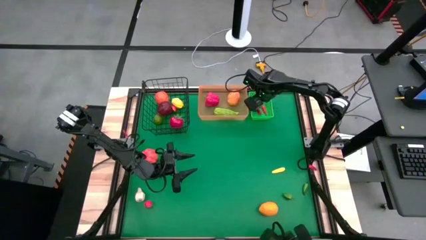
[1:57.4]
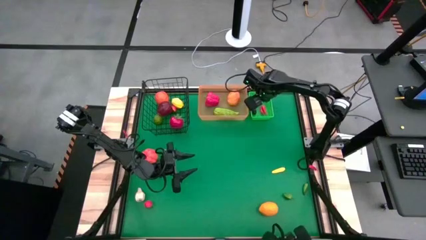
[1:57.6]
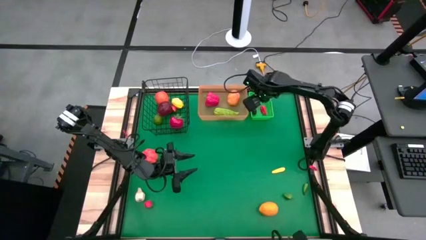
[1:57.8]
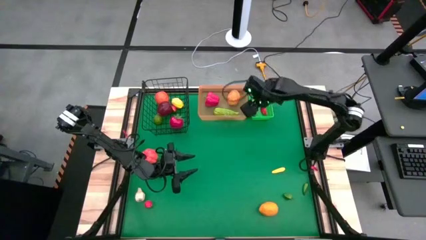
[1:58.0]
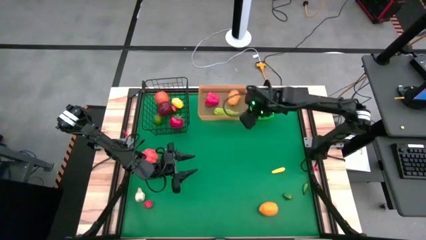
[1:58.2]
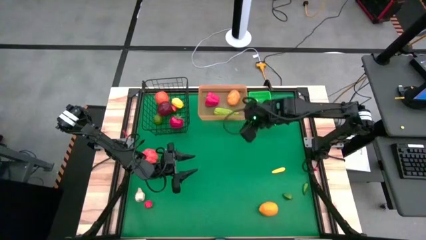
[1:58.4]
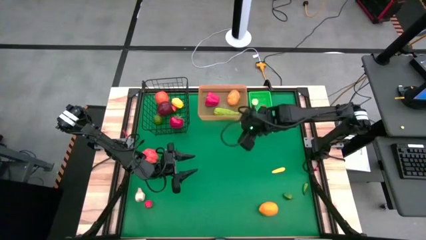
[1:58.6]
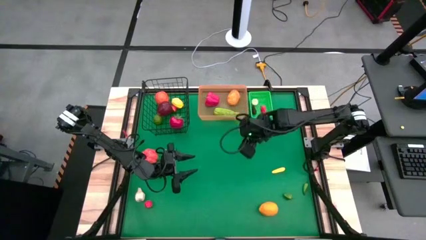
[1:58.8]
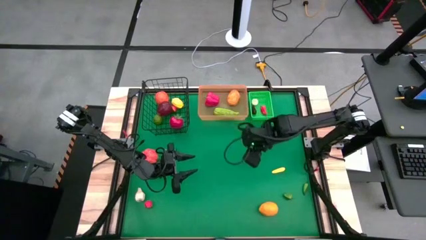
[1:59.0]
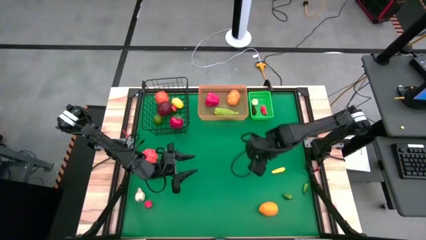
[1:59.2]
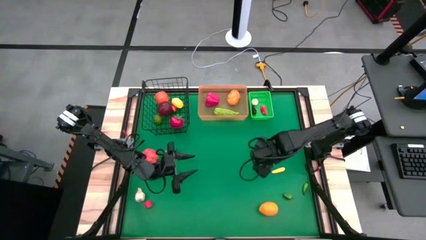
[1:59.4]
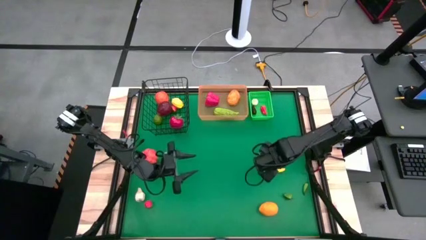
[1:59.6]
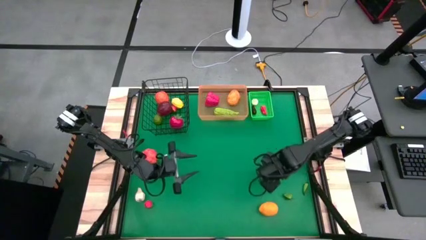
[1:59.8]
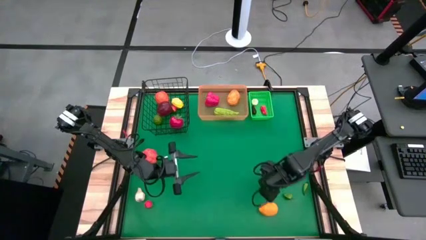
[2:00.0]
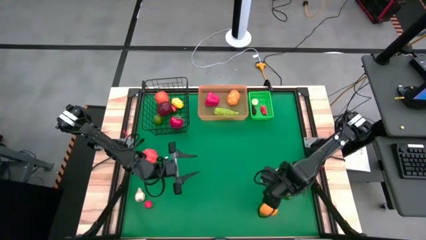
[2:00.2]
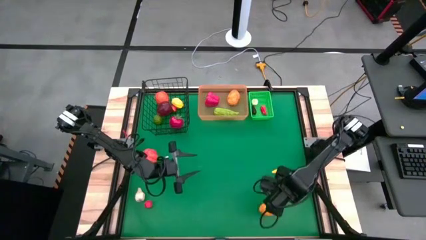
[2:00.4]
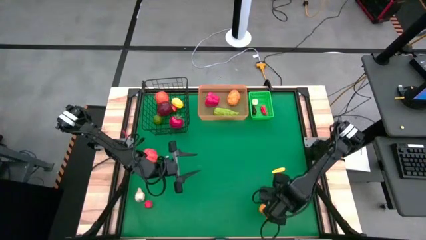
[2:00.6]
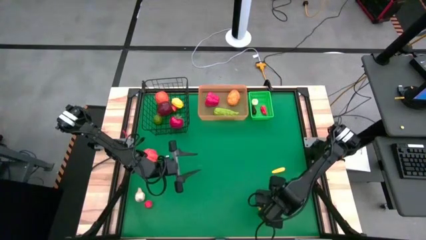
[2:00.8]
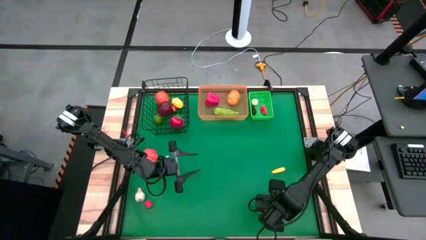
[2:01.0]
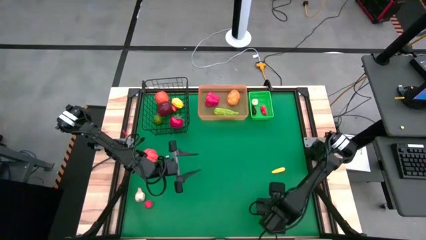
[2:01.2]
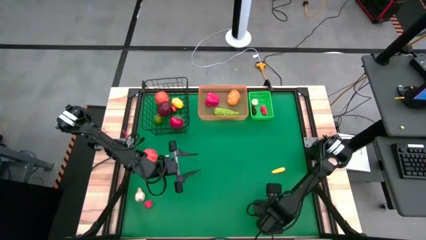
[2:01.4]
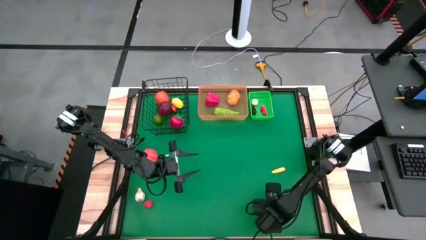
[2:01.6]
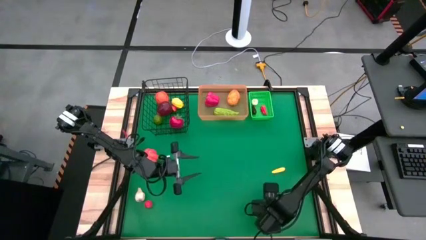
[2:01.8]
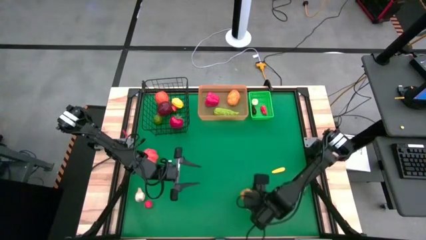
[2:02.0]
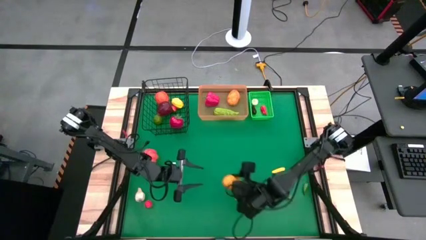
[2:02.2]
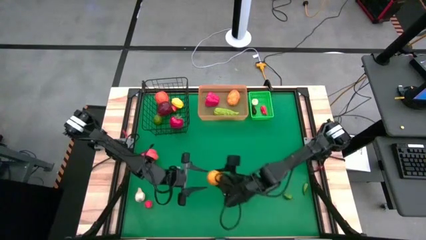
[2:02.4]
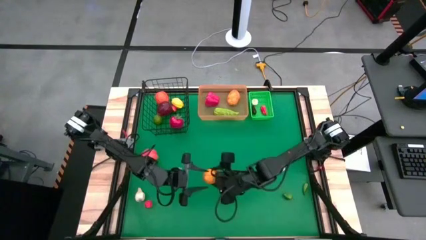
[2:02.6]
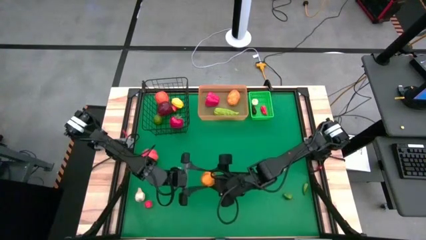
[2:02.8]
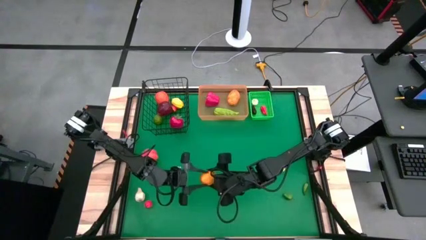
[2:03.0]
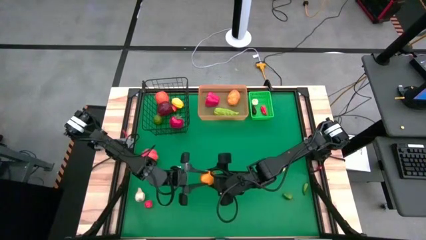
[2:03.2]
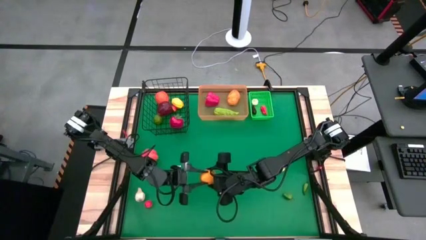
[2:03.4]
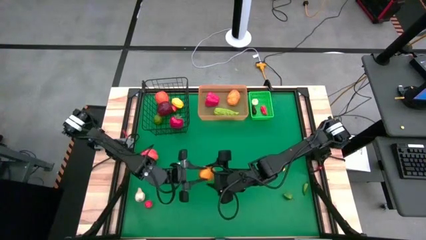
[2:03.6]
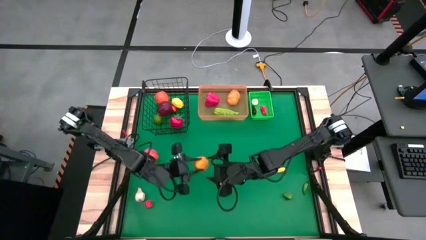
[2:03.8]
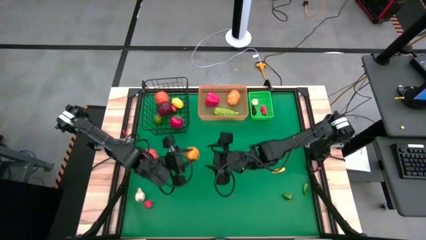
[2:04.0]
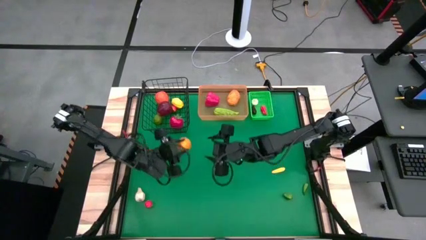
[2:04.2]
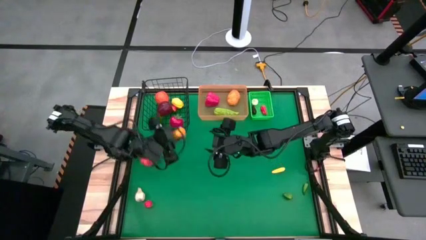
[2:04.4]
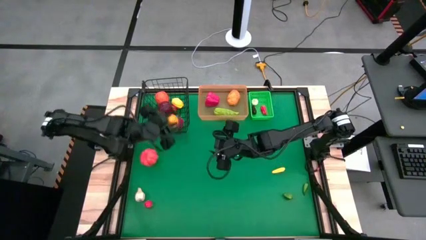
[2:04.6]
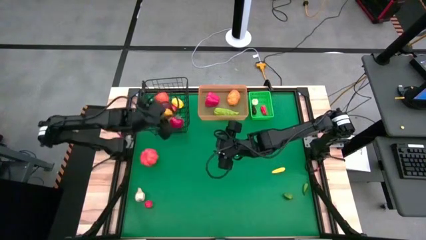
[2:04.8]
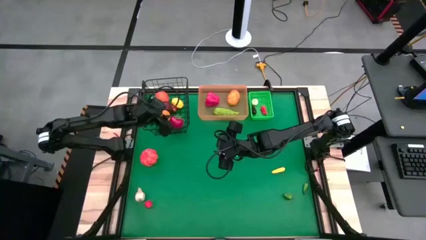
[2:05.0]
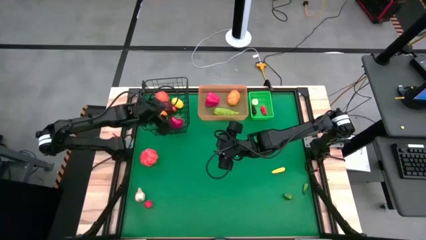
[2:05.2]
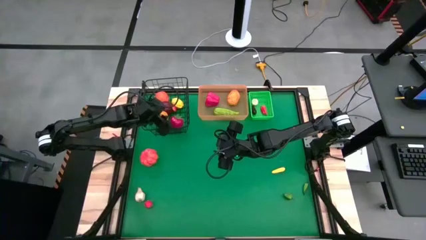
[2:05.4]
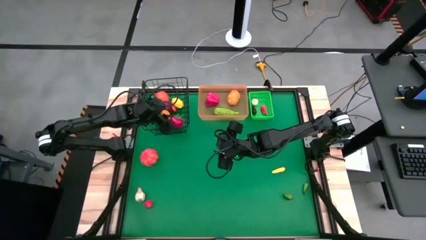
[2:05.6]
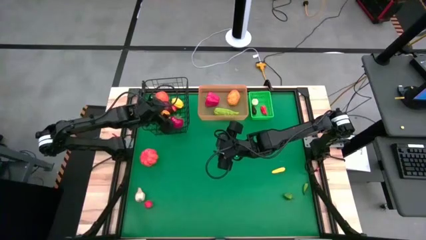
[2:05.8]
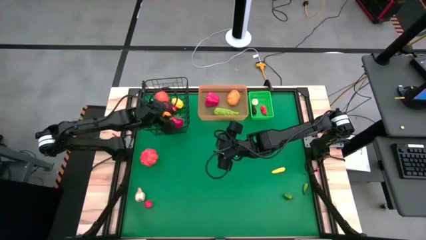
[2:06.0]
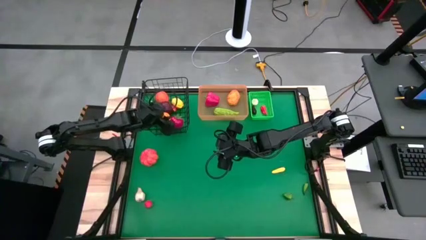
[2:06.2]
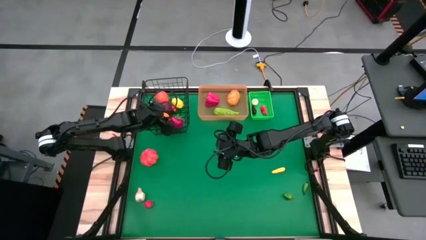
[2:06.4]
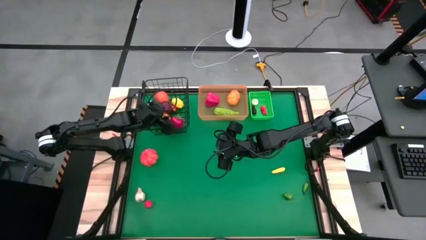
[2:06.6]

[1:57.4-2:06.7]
Task: Sort produce into baskets
Put the yellow lemon into the black wire basket

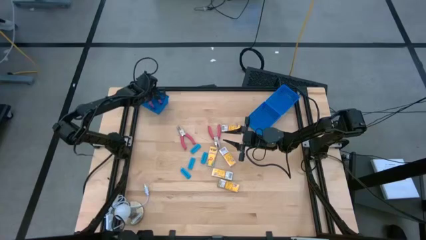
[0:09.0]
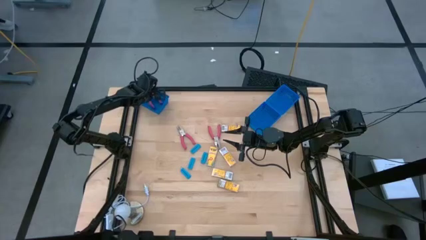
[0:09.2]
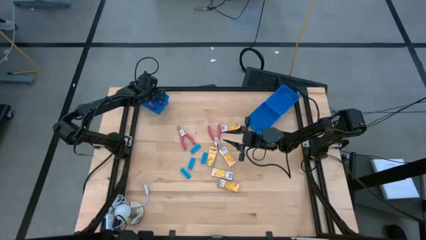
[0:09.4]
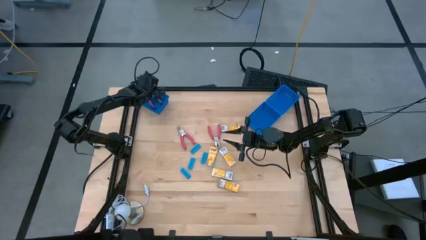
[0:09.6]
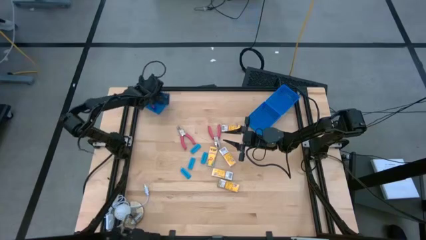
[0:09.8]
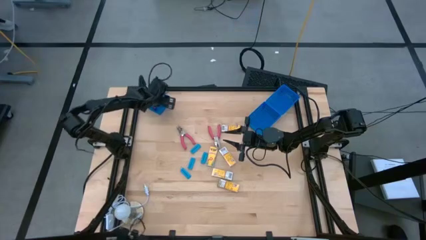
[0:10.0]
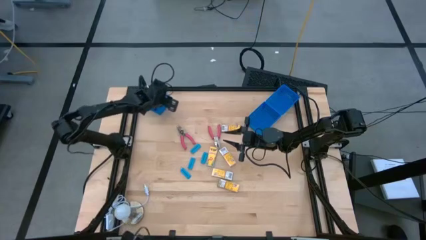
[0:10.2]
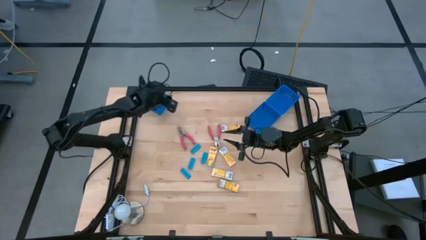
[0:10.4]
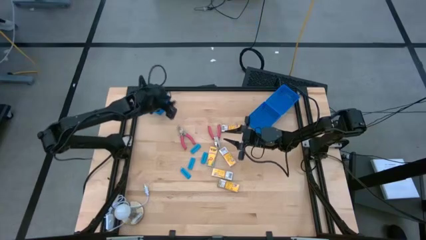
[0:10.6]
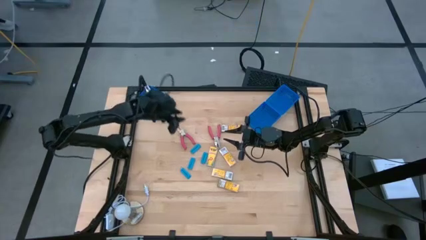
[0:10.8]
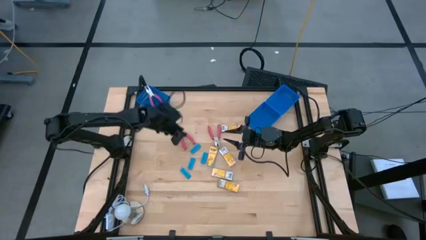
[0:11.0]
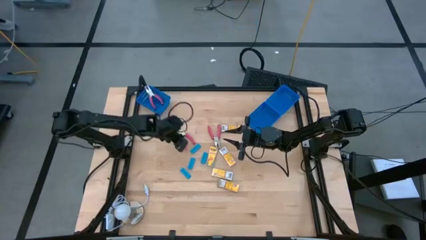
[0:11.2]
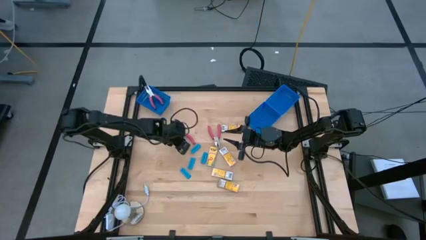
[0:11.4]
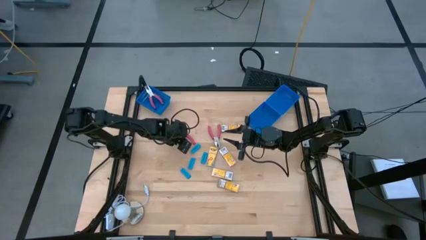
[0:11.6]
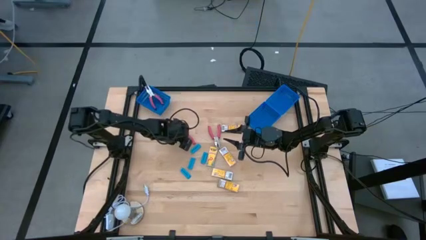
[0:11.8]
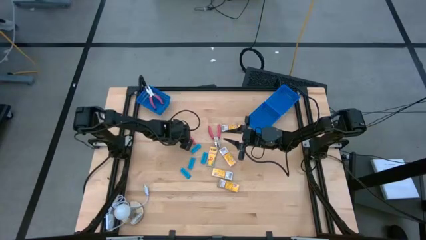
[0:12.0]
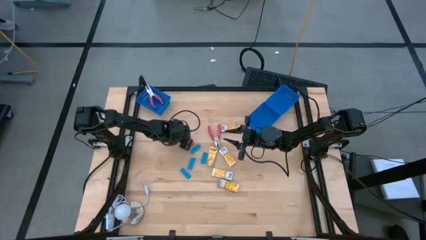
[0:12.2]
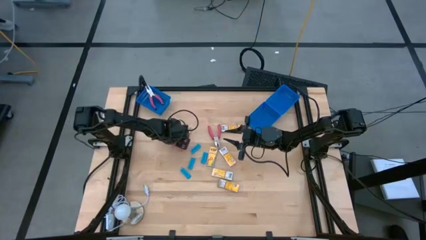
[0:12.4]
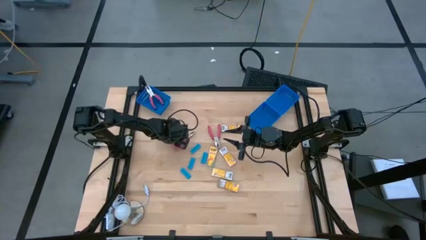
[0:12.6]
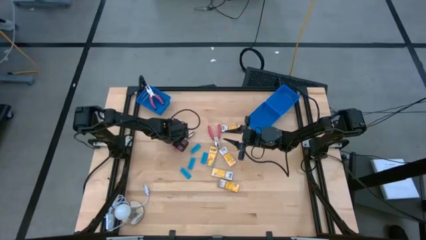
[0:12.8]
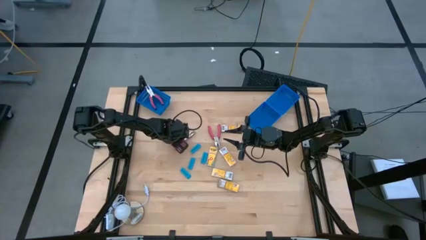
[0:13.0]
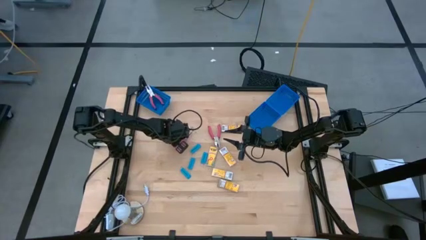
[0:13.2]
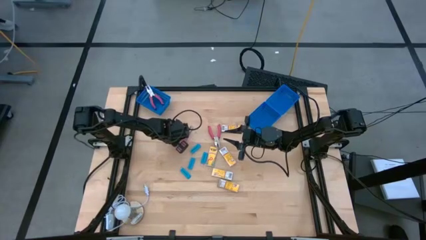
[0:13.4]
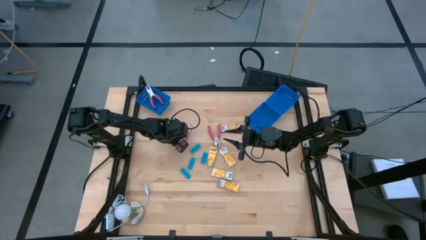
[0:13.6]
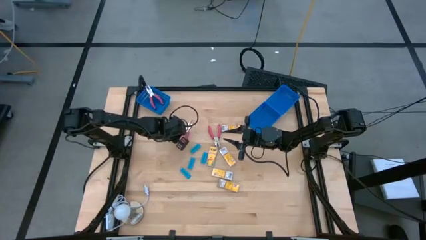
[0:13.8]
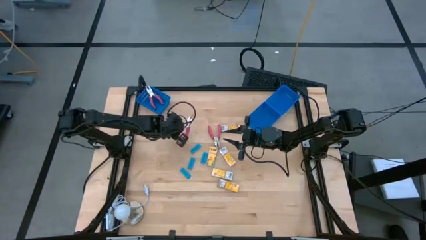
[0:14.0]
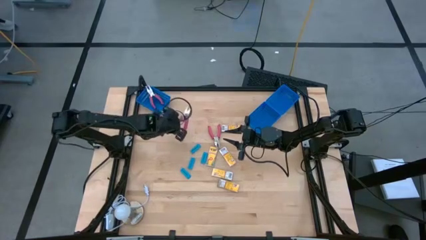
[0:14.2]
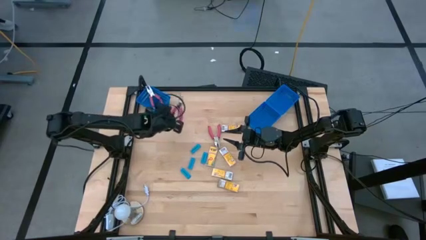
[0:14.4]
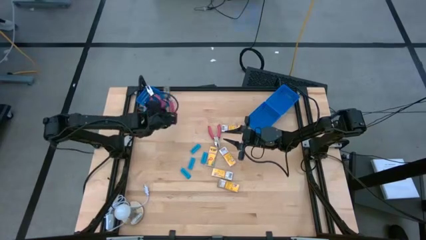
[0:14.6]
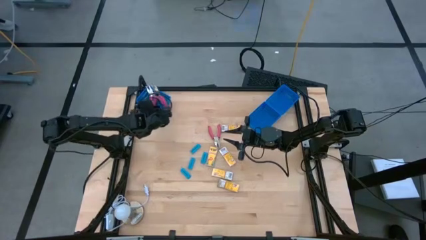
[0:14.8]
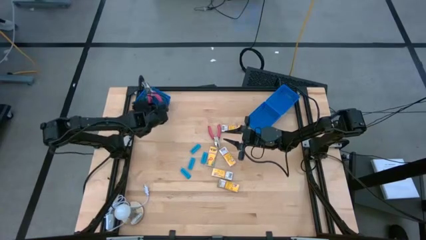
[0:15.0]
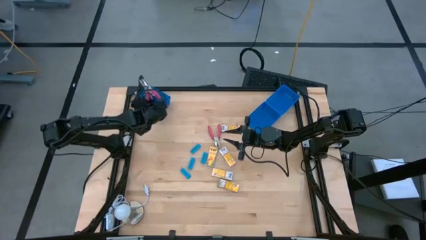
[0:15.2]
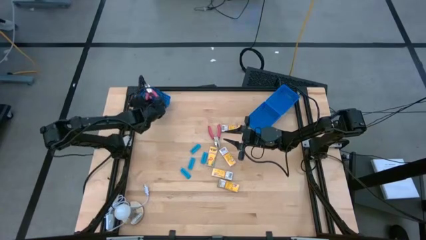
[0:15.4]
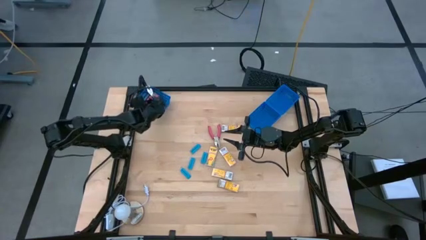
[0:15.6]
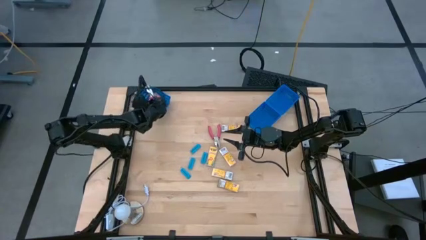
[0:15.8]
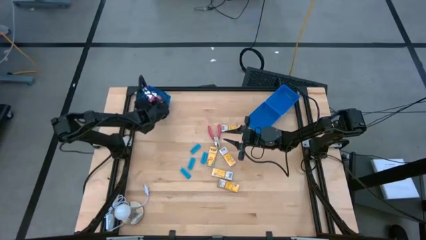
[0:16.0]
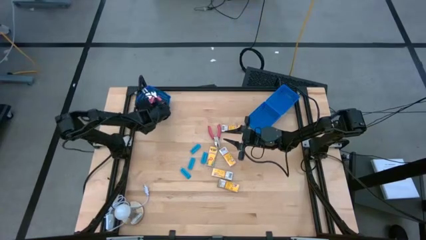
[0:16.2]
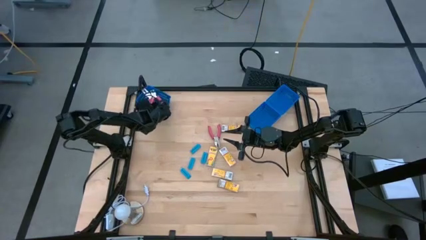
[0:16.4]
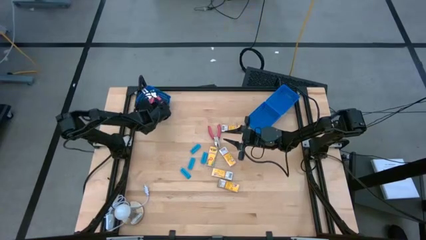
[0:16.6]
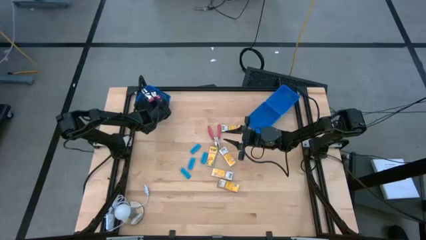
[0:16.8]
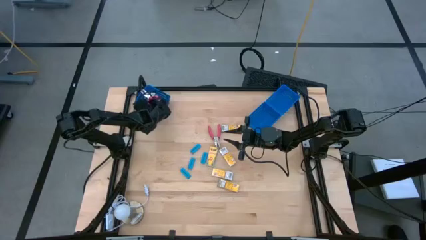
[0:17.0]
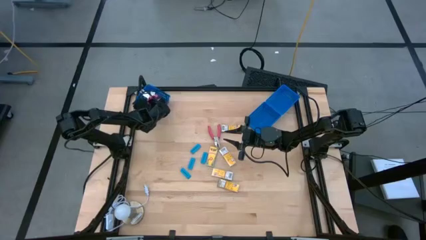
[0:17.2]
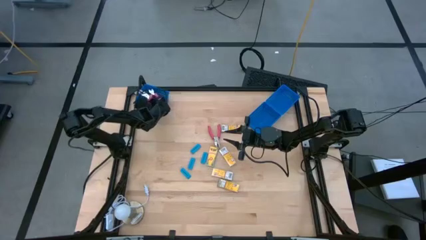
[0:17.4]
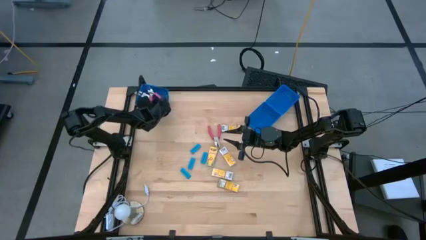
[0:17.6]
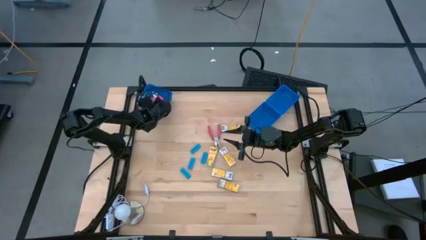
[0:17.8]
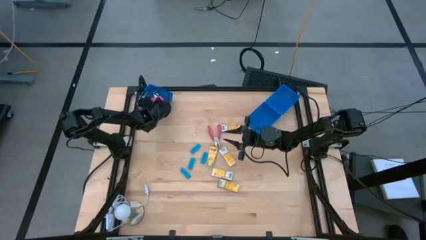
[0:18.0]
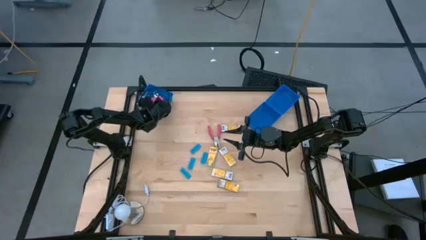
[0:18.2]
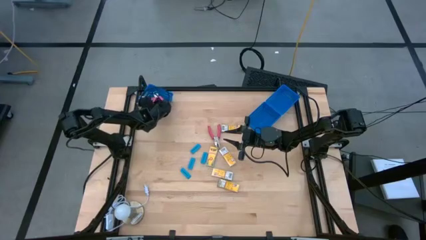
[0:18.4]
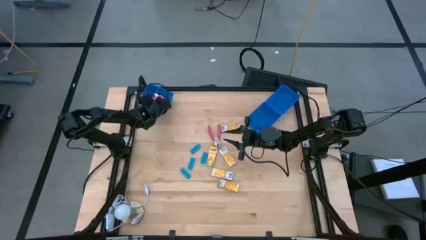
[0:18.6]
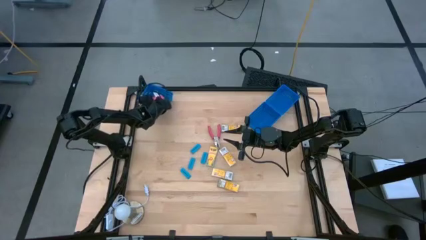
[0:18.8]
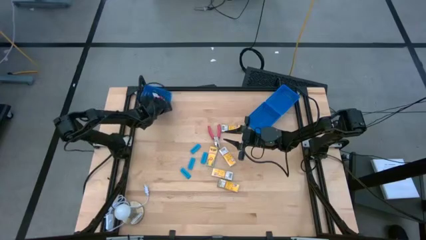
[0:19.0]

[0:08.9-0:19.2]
Task: Pick & Place School Supplies
Put the pink puncher into the top left blue basket
